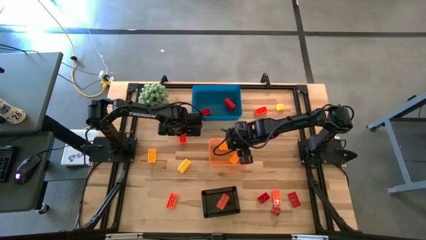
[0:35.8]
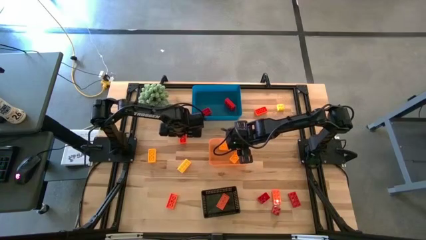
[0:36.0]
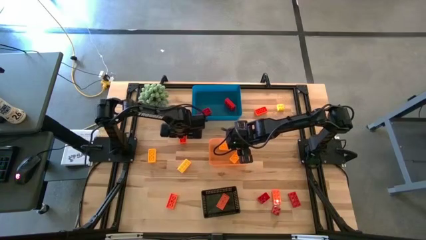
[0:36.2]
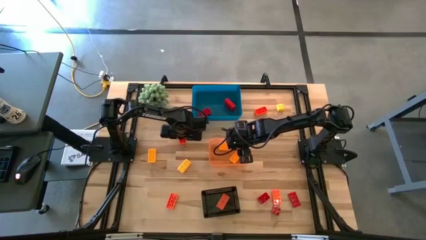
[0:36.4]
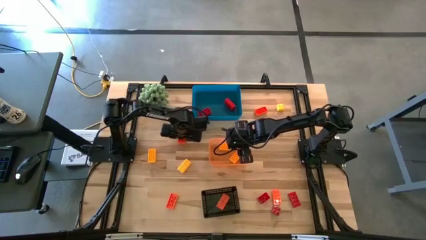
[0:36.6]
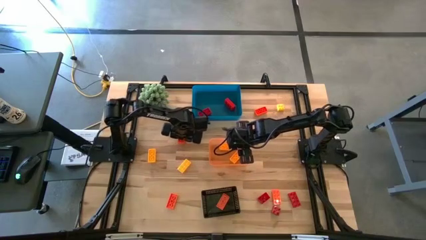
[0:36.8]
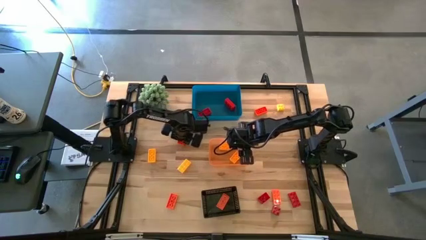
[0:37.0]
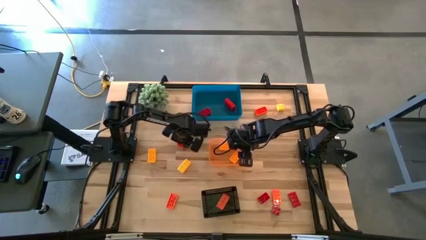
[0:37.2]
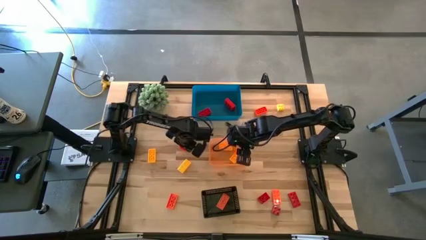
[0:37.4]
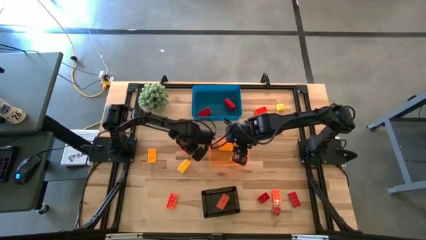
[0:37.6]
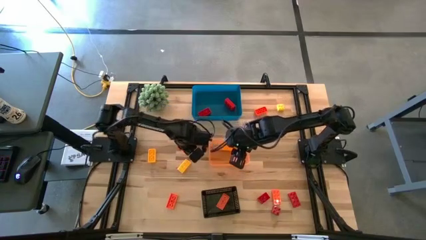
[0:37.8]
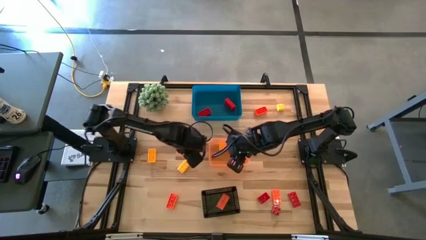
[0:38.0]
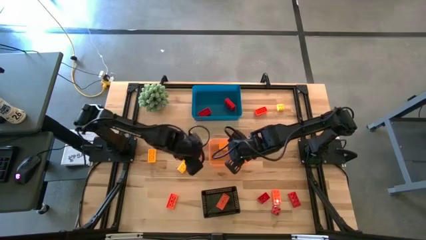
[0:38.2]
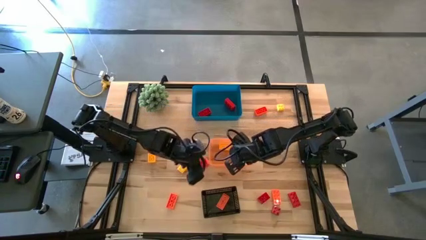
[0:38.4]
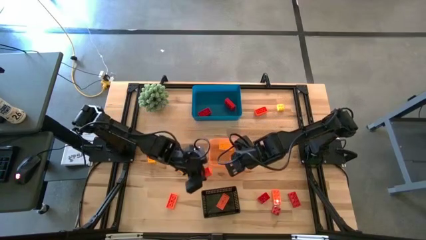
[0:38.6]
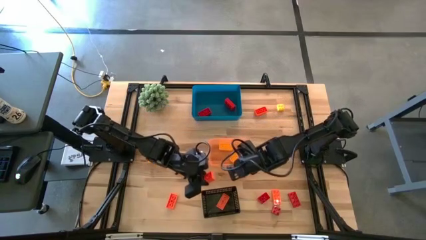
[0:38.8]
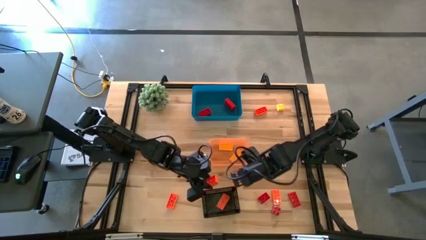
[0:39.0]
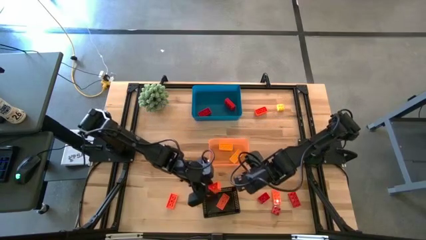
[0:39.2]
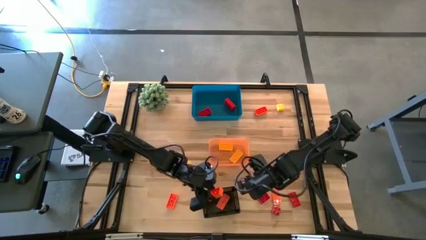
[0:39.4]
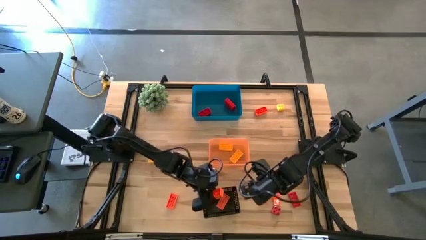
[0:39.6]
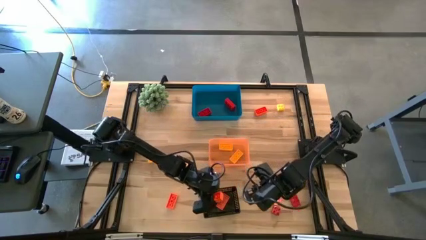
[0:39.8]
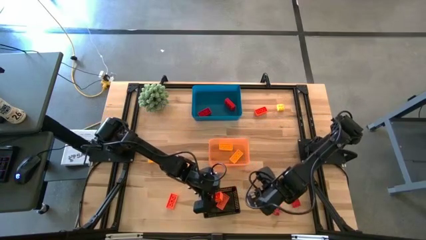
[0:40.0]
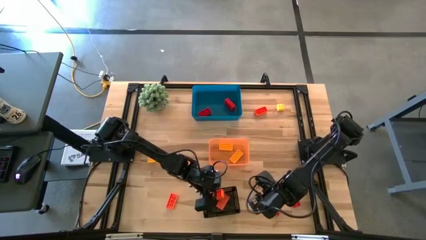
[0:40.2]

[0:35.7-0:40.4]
Task: Sort & place blocks by color
Put the orange game piece into the black bin

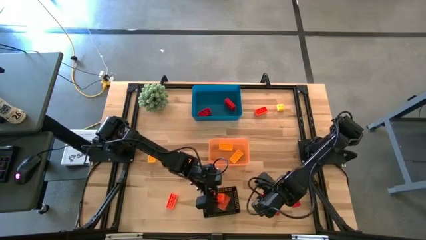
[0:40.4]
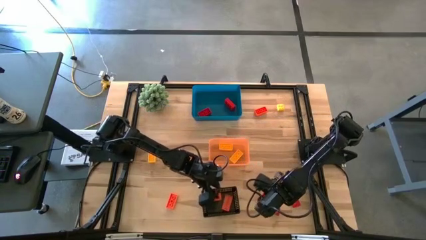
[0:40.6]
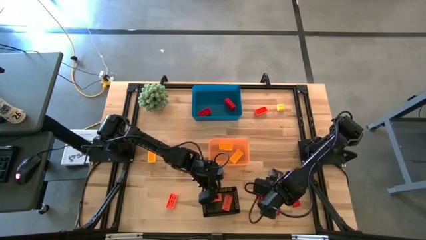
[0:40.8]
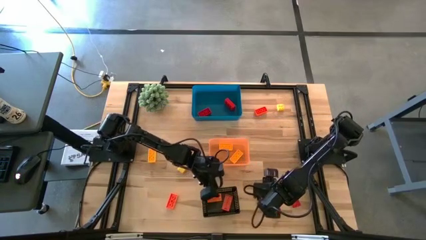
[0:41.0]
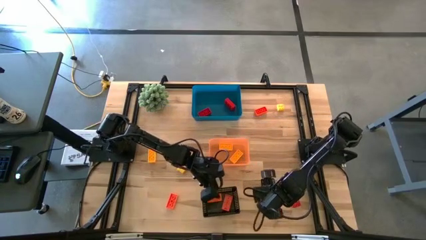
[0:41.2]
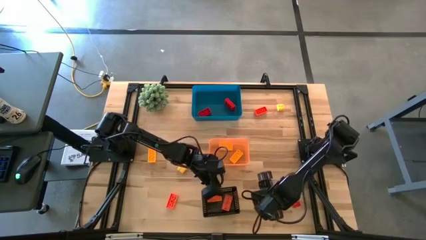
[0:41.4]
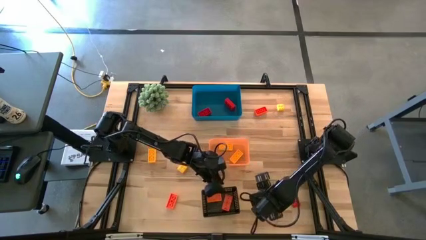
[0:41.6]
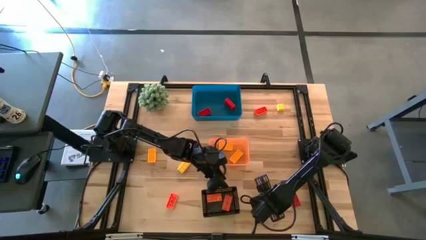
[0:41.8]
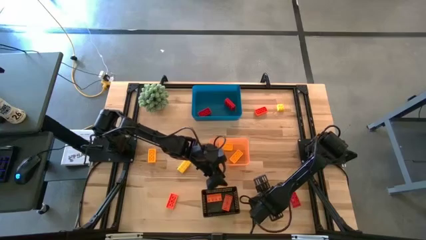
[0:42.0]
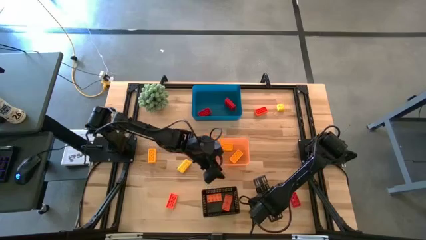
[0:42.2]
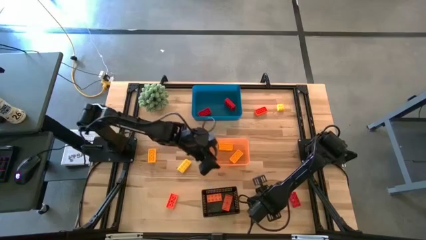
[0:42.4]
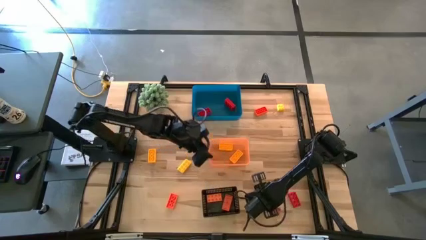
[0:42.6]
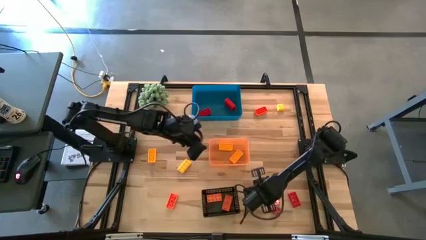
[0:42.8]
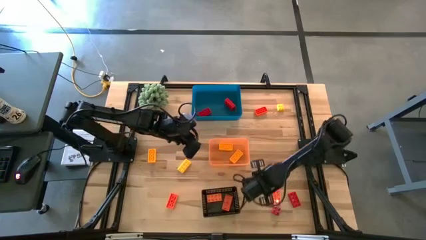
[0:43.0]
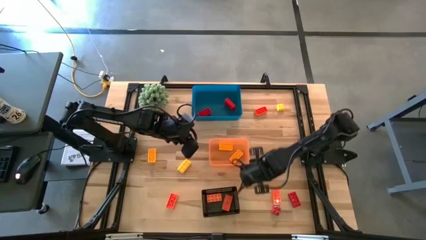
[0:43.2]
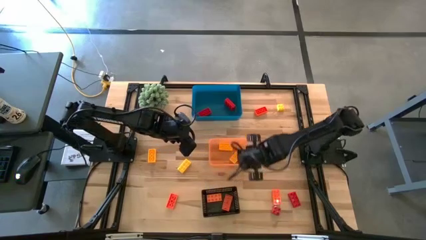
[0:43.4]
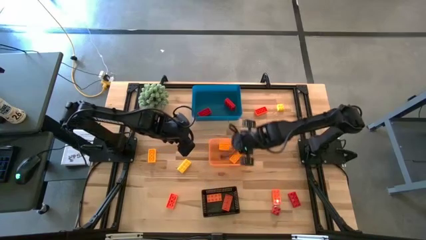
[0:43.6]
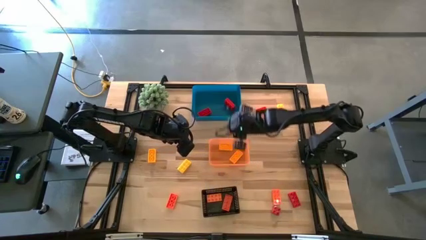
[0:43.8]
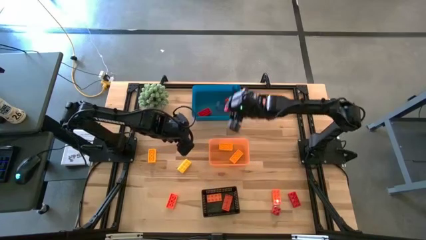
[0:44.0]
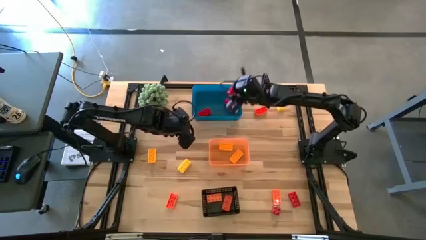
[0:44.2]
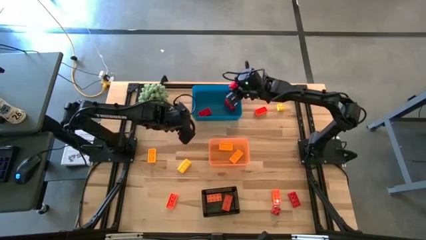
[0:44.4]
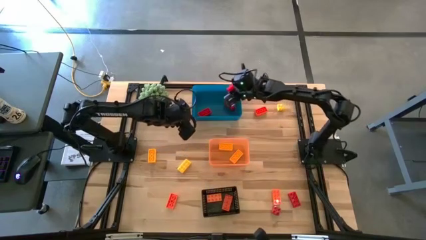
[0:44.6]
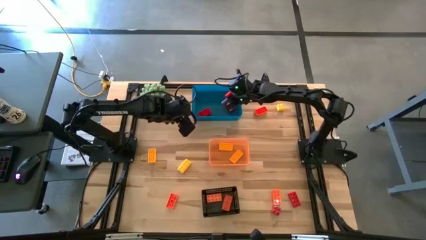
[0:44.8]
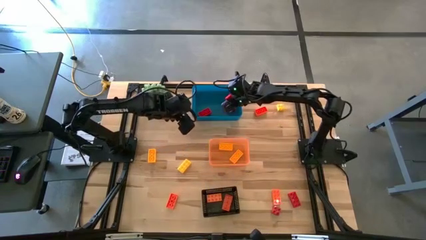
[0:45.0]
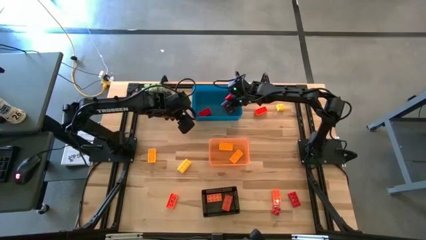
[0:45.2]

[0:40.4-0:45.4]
Put the red game piece into the blue bin

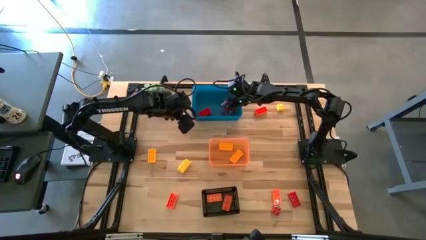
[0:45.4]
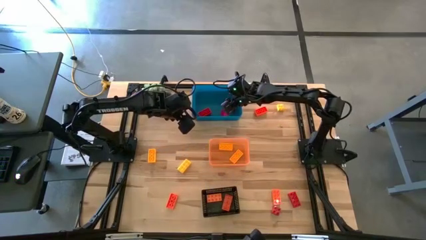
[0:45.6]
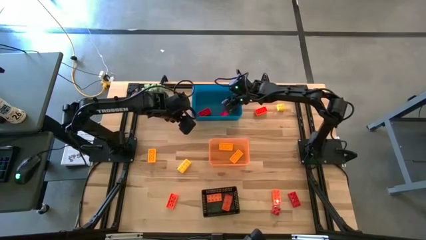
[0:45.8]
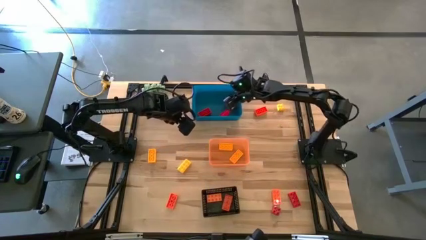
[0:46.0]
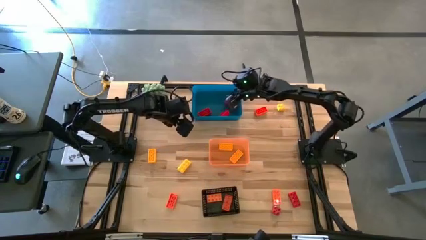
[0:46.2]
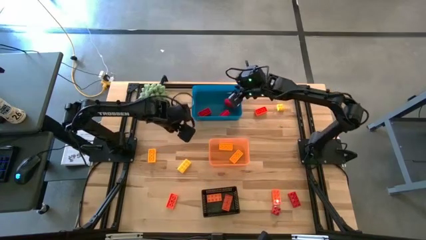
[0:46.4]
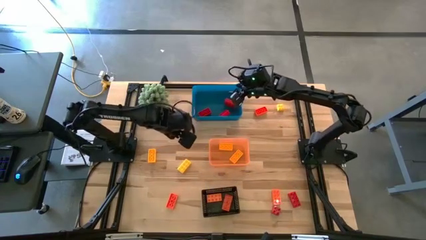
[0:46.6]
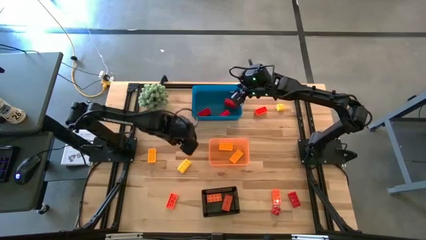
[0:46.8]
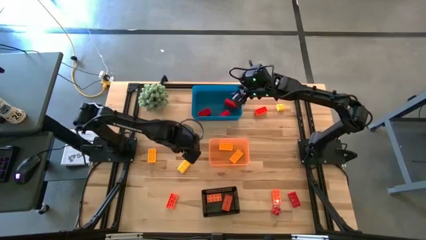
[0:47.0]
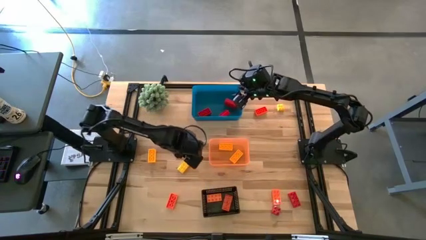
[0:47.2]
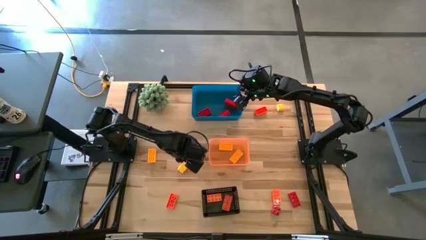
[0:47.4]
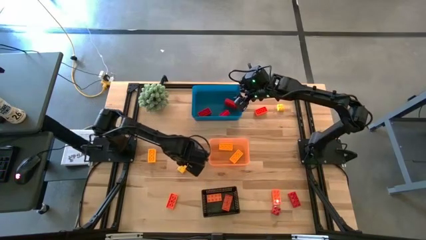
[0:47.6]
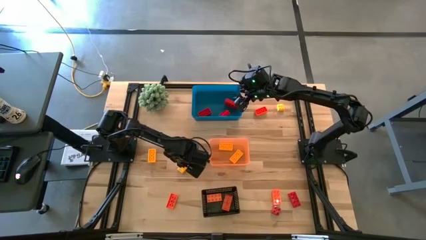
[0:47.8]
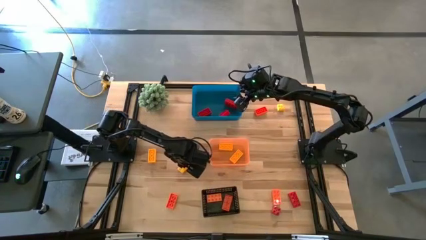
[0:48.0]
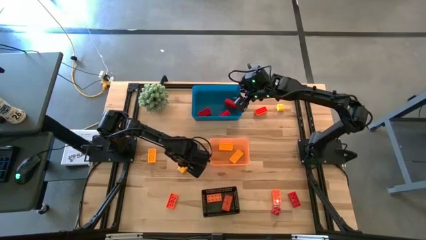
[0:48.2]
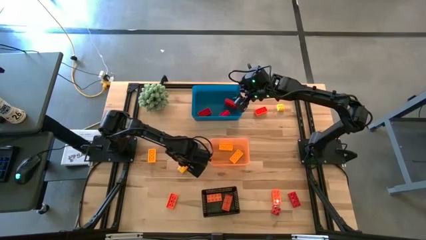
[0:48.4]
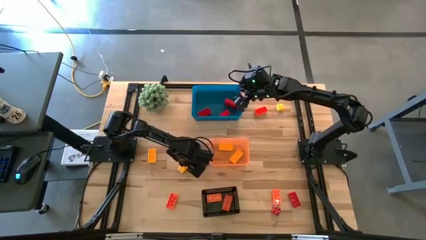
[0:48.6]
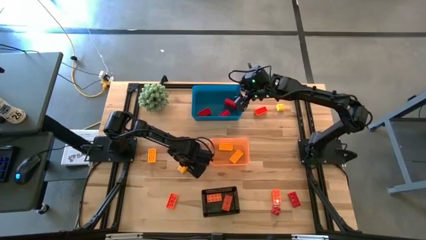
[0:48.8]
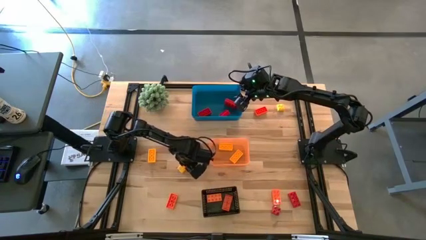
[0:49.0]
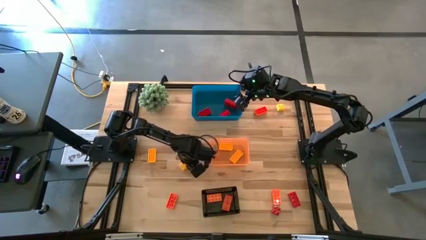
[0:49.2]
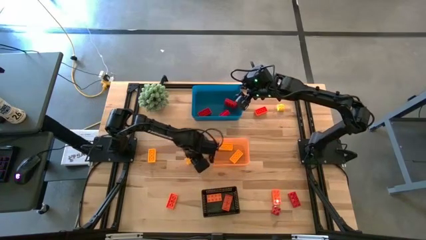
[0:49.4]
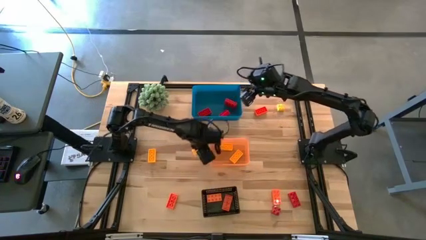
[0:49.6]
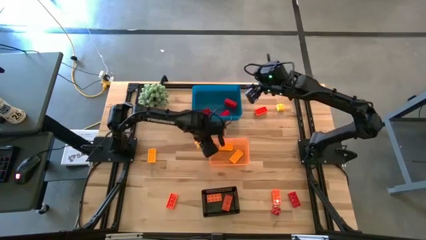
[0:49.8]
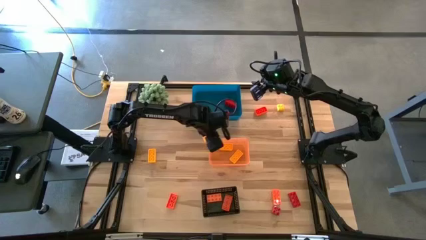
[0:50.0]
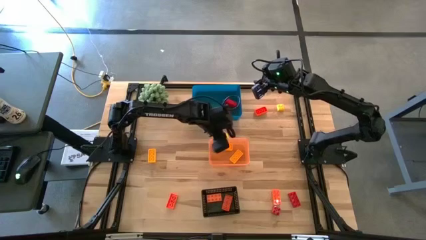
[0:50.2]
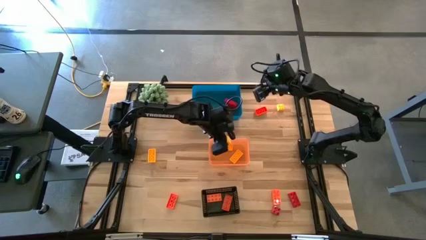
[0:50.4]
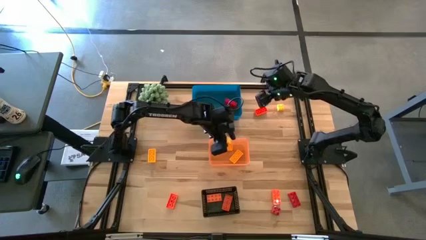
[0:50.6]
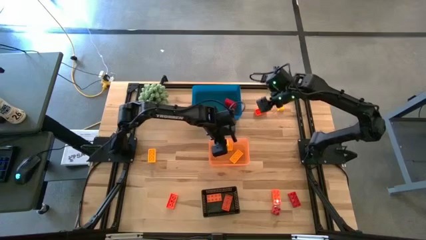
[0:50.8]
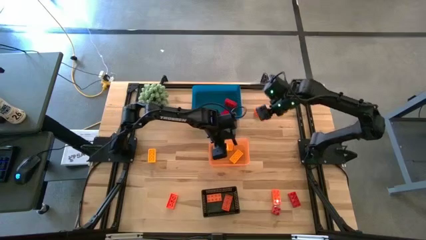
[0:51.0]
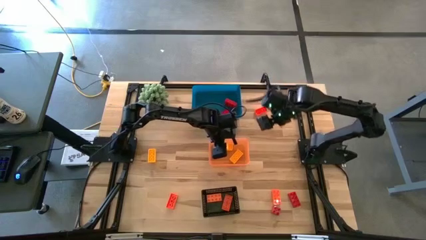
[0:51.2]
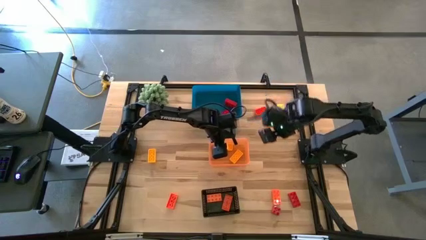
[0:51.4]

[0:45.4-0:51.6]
Put the yellow game piece into the orange bin
